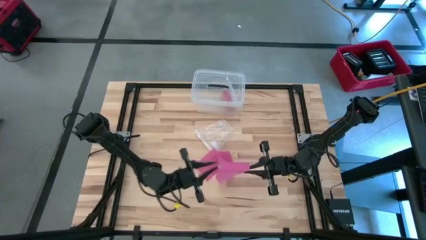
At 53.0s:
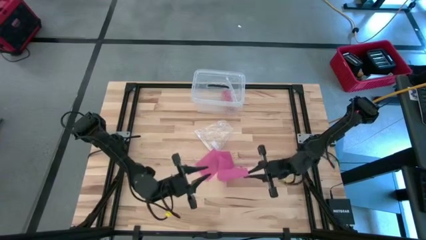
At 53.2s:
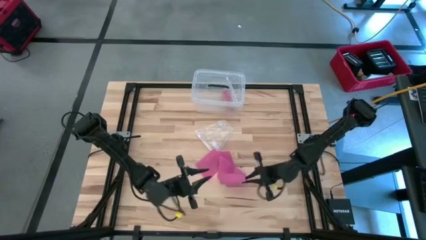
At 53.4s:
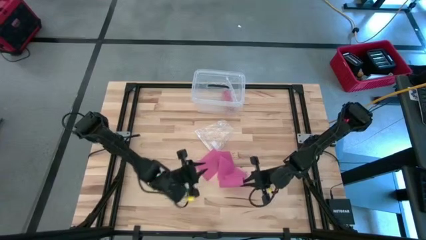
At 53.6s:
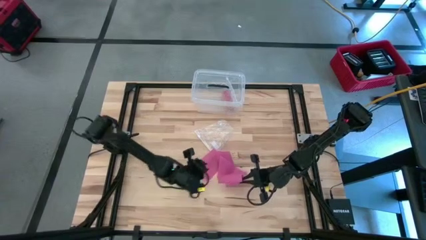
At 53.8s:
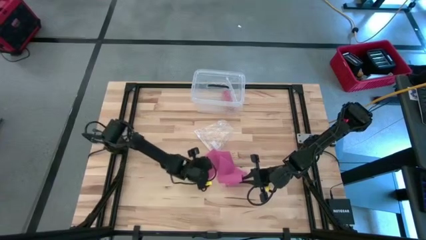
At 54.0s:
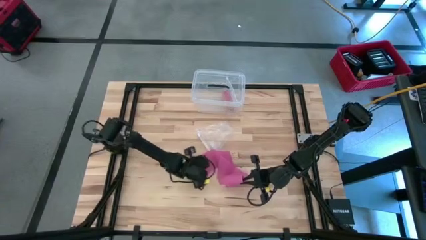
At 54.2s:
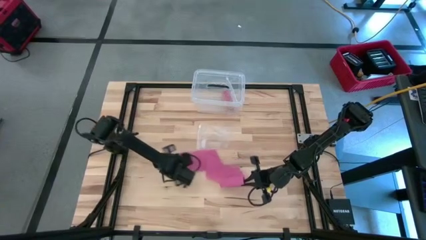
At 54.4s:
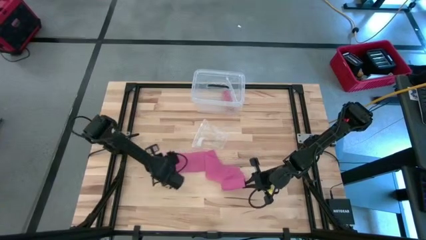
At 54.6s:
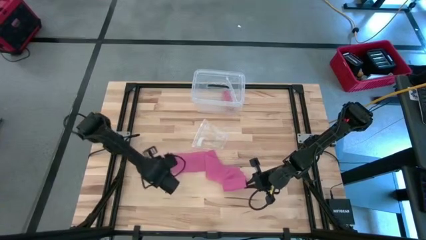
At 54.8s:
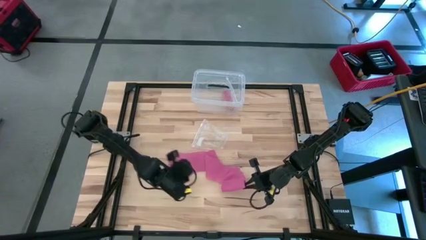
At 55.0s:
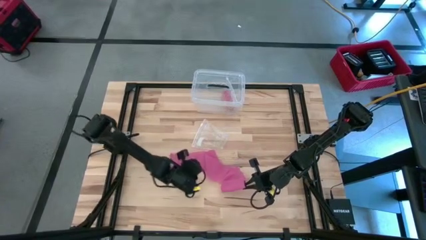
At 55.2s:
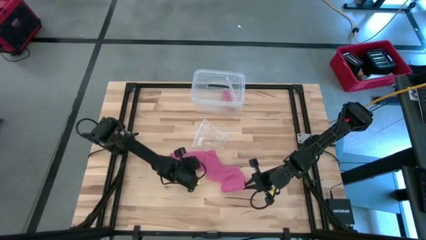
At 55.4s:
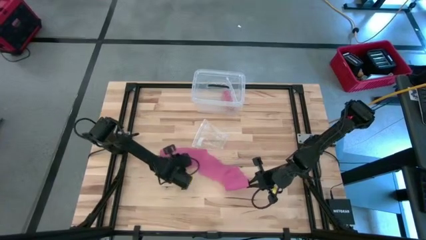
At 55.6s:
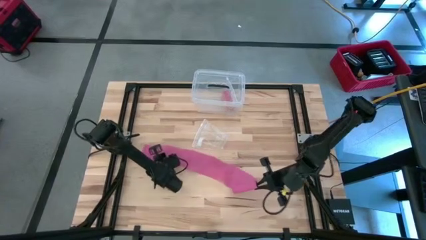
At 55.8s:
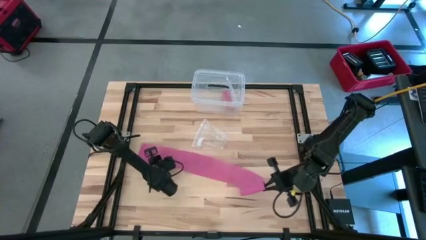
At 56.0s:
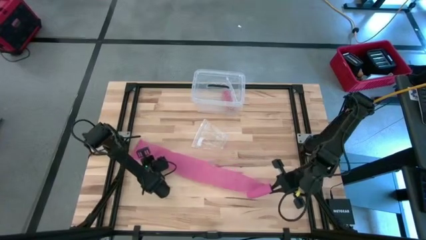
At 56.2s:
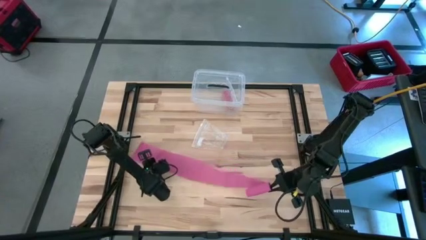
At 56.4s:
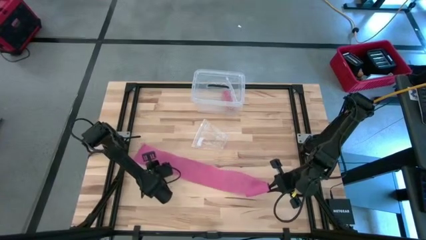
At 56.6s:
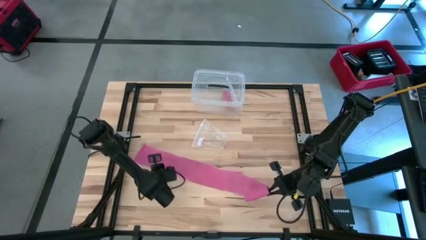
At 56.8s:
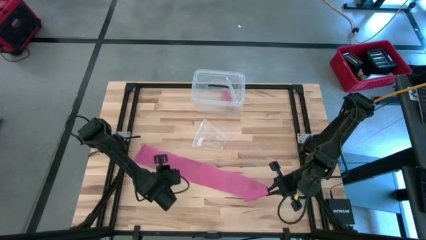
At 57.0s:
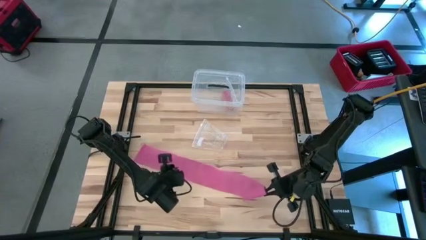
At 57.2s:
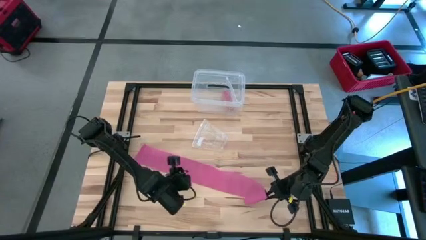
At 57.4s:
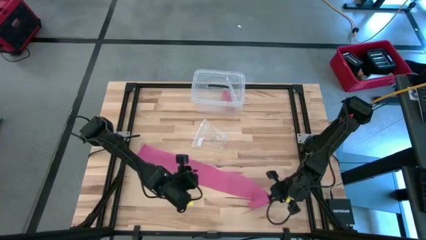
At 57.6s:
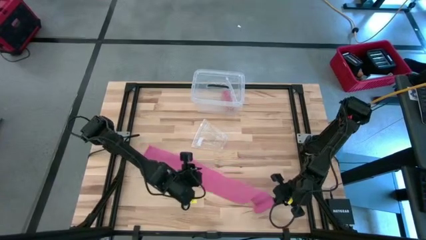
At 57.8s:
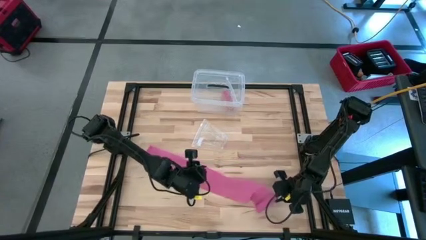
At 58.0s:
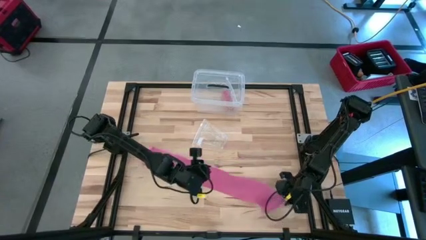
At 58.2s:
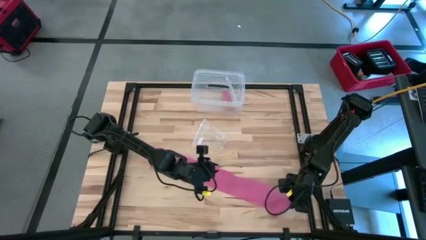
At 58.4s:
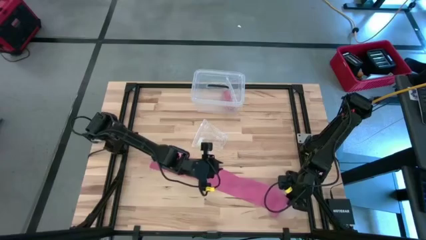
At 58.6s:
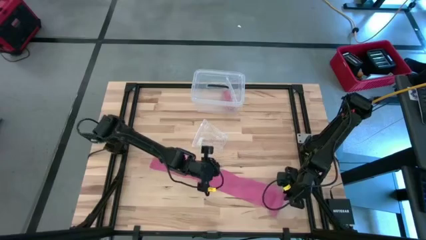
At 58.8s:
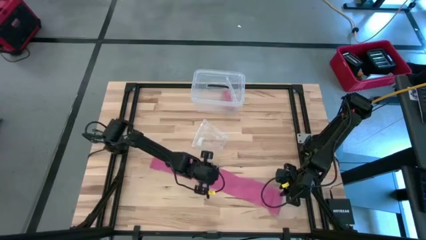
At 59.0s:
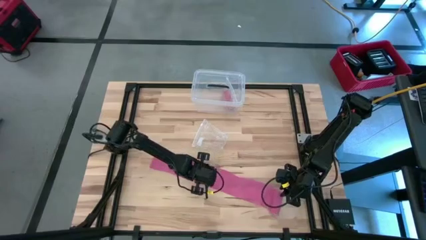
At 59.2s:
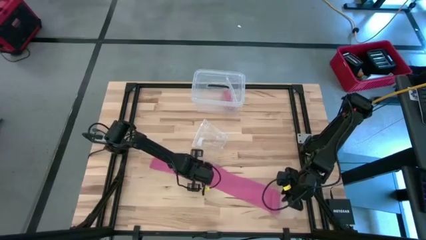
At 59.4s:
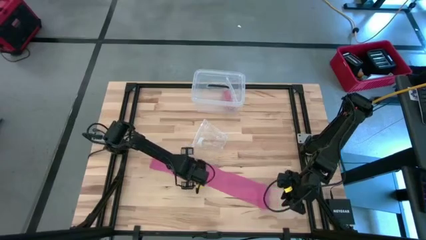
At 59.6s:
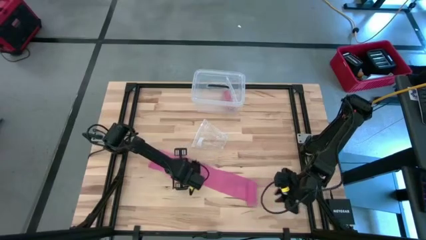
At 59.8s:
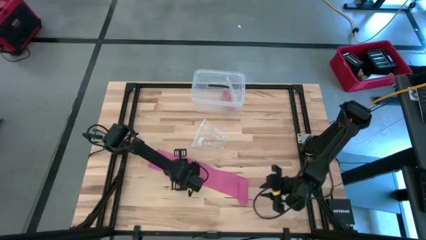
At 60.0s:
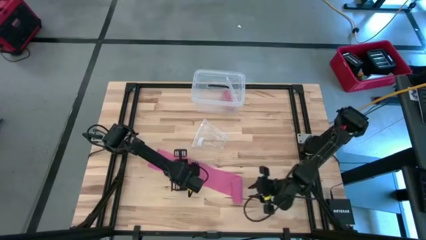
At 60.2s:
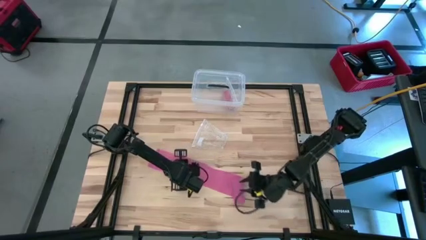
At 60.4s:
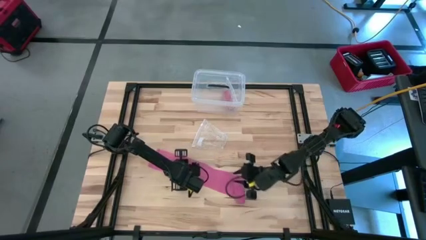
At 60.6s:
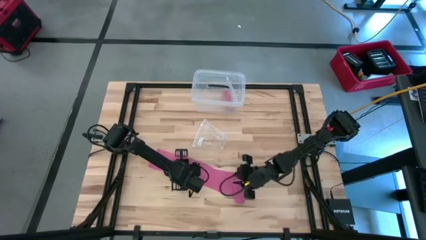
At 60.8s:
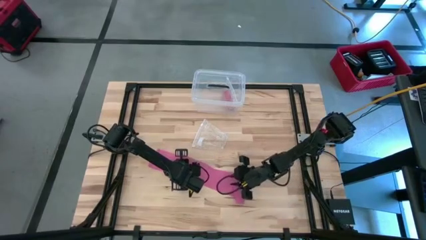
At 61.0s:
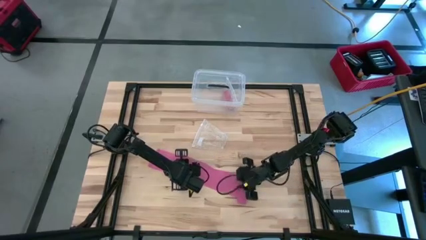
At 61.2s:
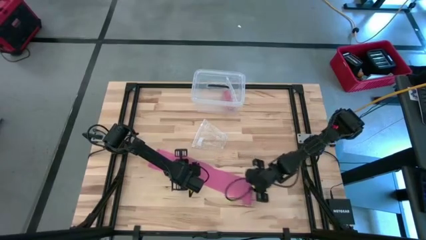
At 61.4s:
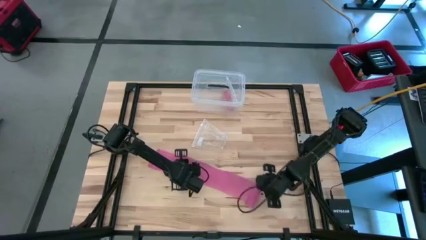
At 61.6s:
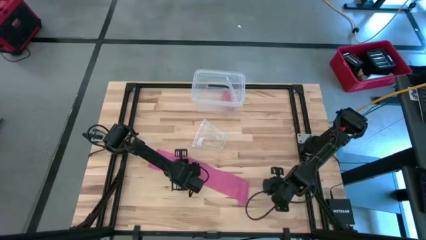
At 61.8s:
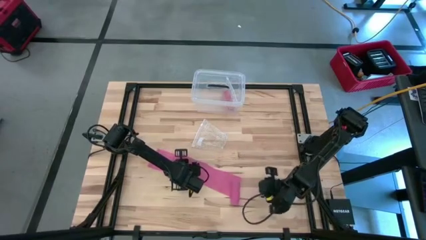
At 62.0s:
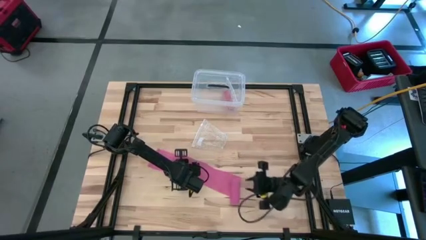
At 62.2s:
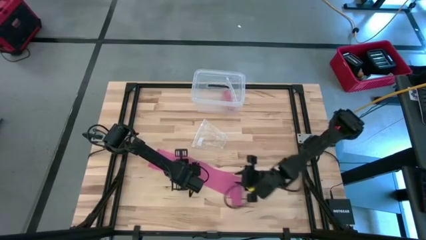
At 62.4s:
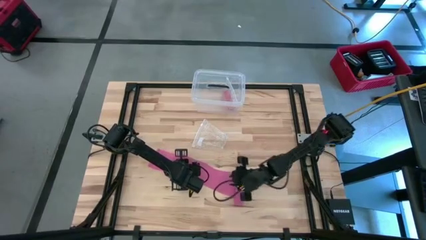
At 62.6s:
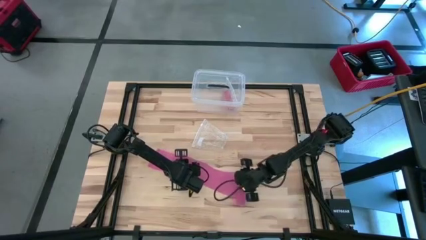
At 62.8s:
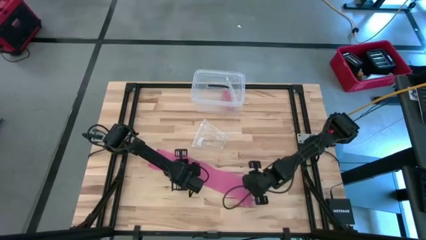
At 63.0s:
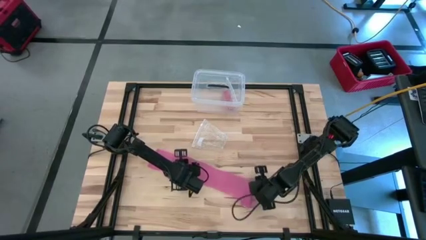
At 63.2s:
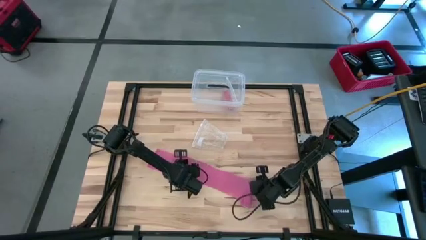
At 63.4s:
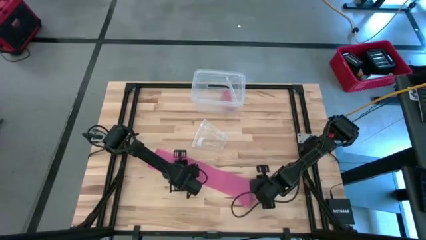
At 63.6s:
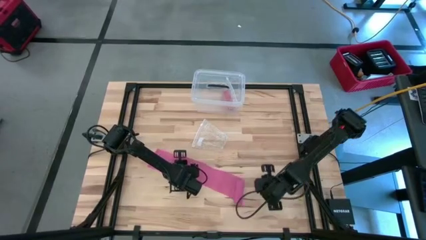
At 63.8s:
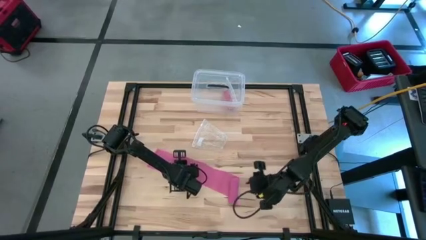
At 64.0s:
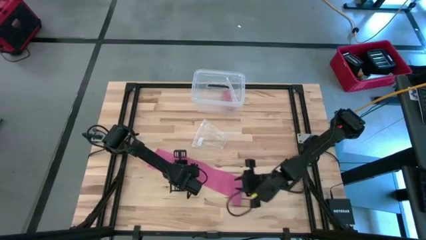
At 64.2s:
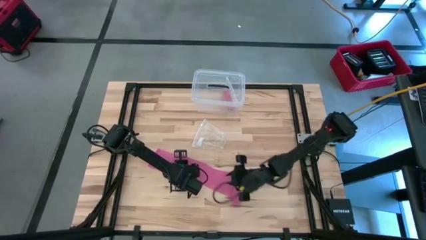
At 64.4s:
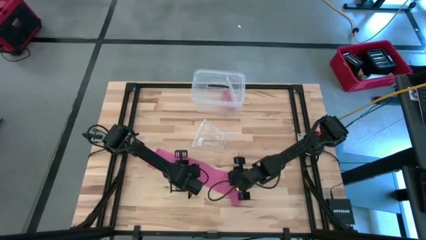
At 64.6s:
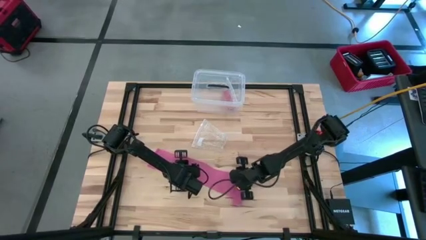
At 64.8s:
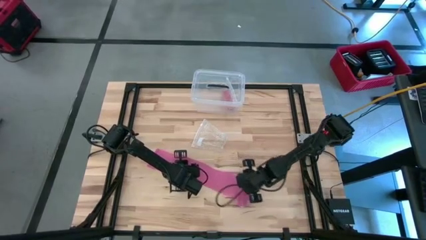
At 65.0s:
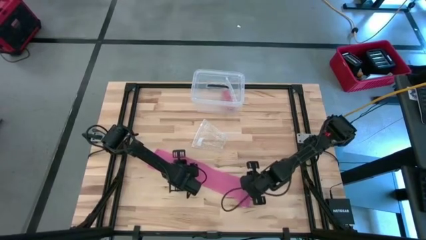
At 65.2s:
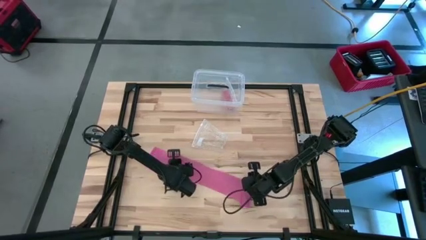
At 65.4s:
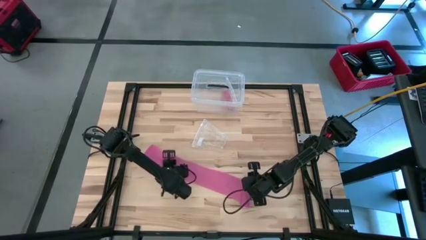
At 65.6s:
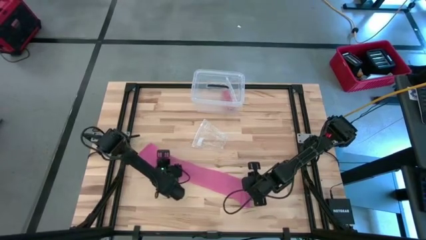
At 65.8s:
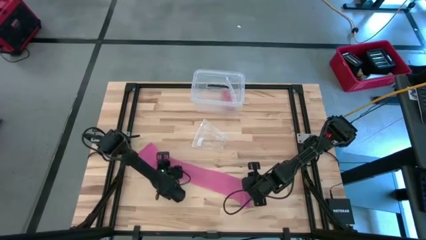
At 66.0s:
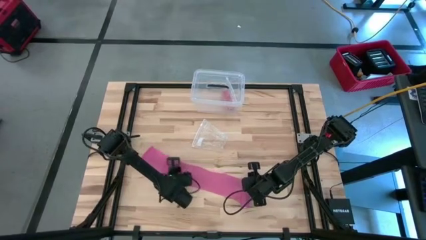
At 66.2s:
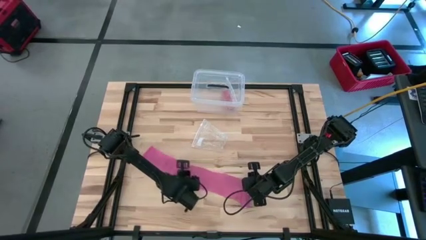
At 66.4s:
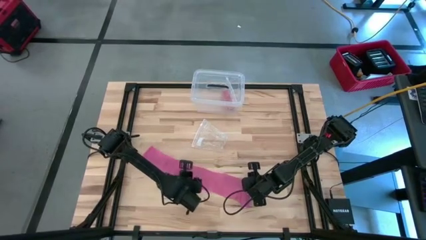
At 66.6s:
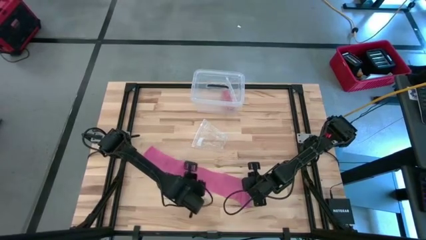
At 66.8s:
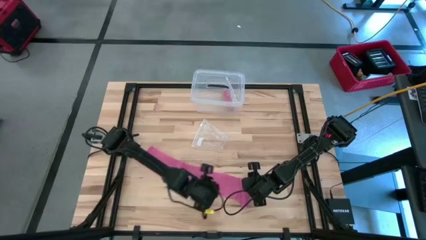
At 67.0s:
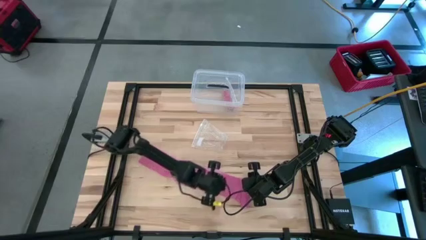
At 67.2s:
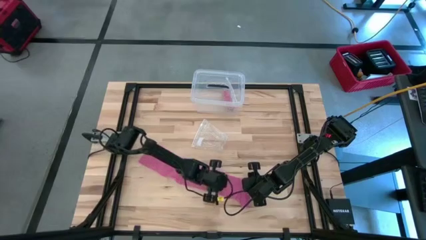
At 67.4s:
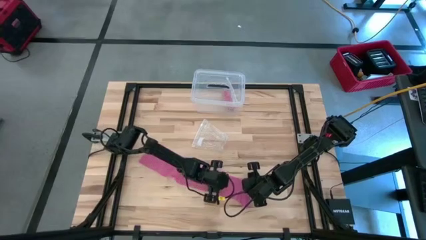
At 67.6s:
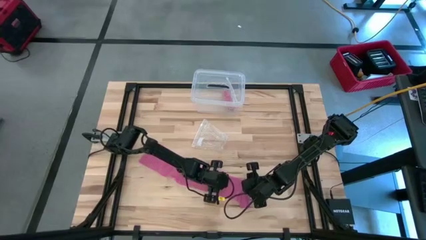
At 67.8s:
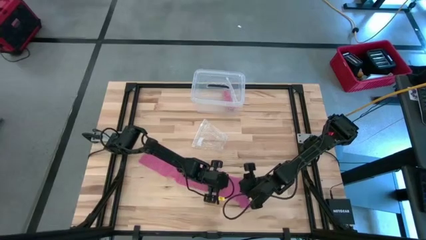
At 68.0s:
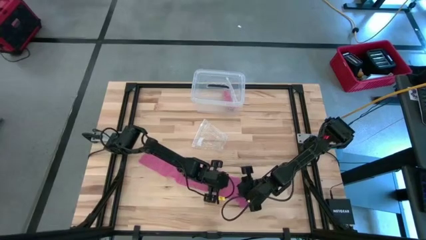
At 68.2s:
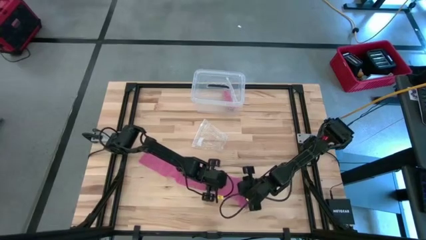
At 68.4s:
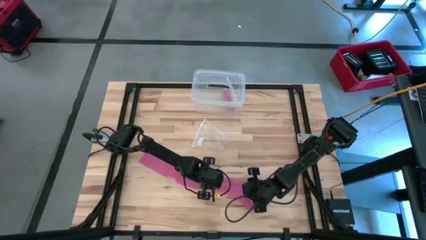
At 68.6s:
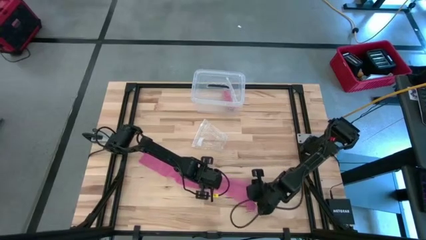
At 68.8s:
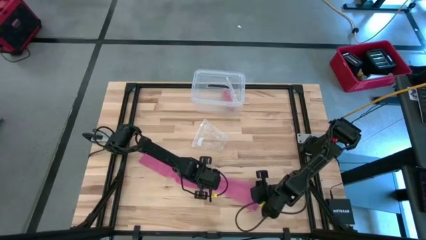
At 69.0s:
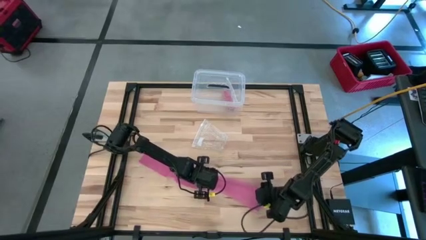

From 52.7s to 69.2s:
Task: Roll bandage
Roll the pink bandage
